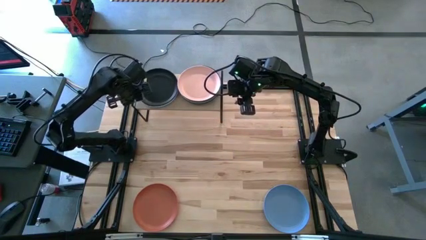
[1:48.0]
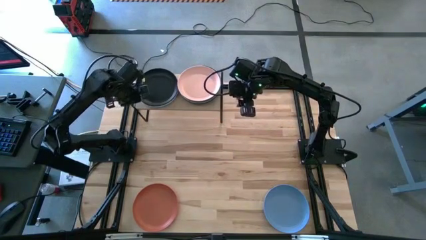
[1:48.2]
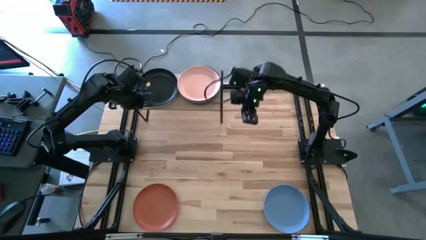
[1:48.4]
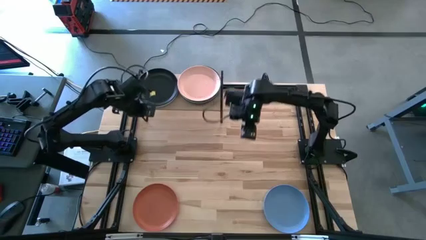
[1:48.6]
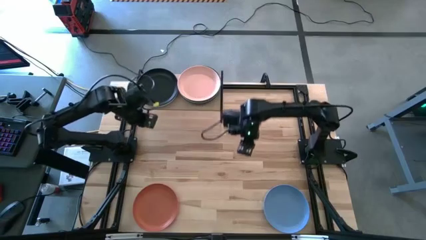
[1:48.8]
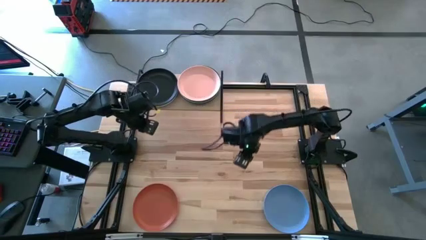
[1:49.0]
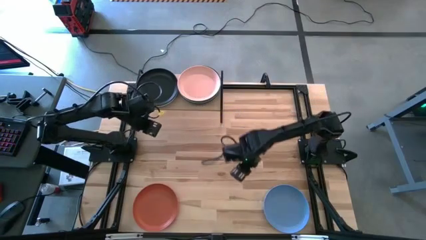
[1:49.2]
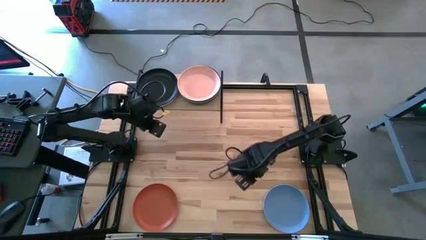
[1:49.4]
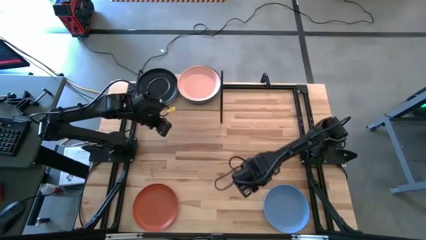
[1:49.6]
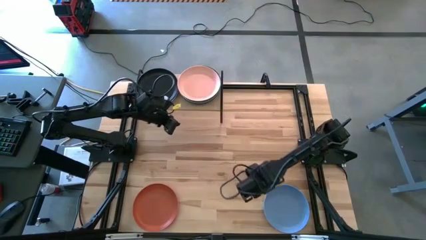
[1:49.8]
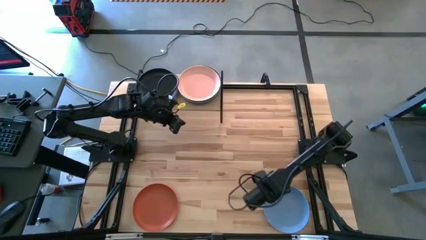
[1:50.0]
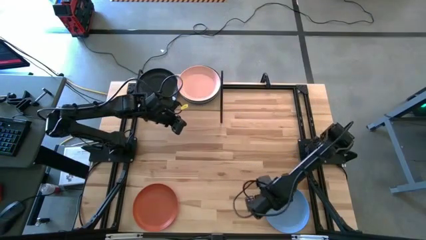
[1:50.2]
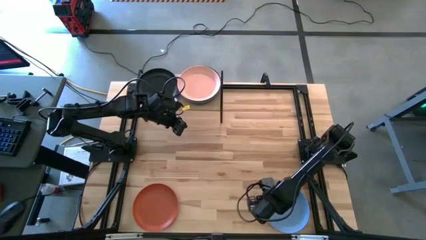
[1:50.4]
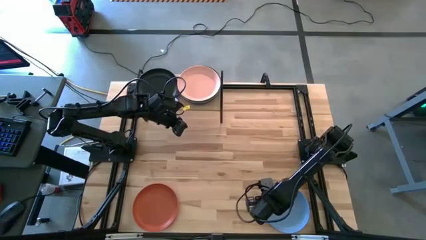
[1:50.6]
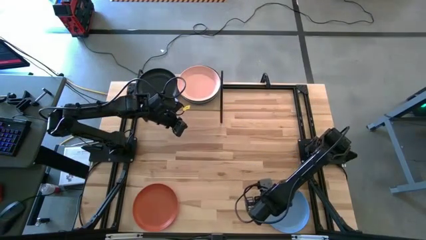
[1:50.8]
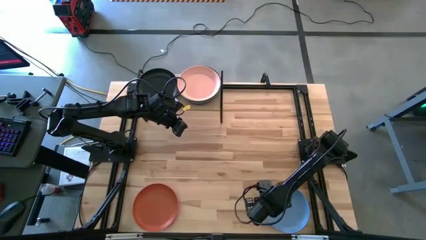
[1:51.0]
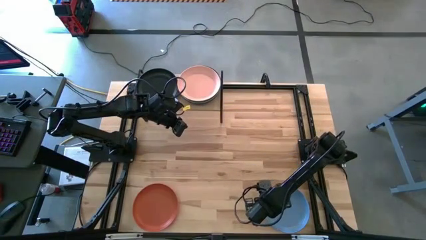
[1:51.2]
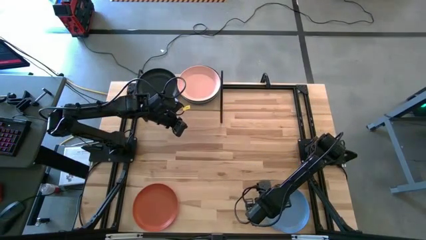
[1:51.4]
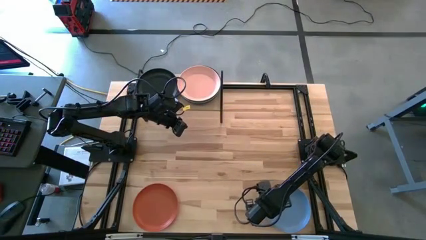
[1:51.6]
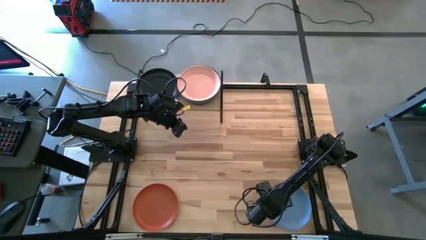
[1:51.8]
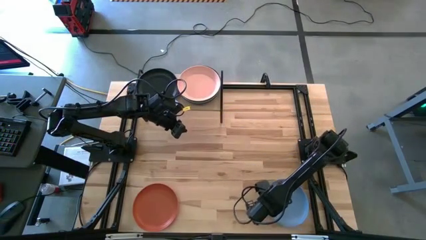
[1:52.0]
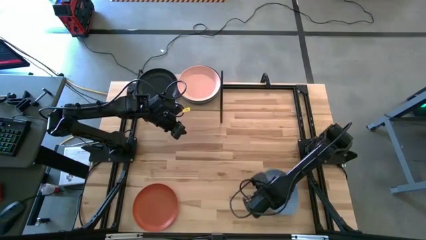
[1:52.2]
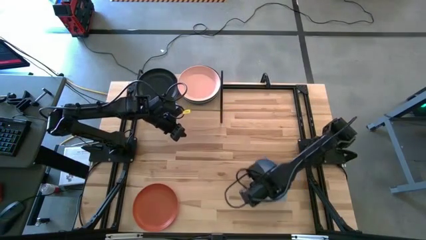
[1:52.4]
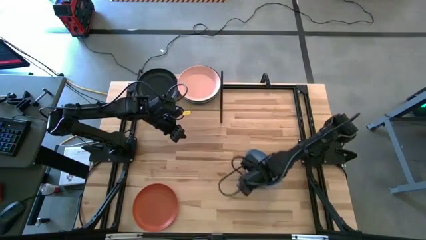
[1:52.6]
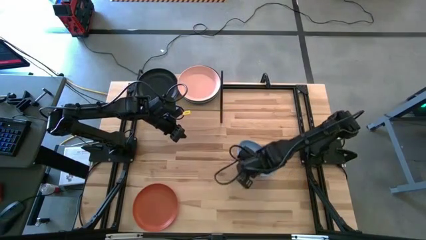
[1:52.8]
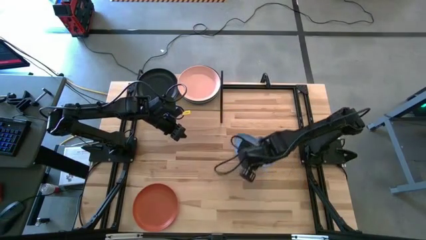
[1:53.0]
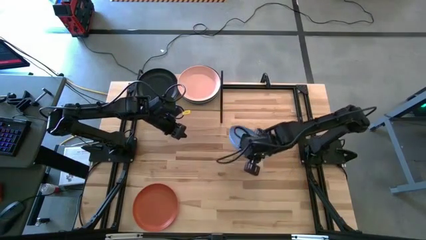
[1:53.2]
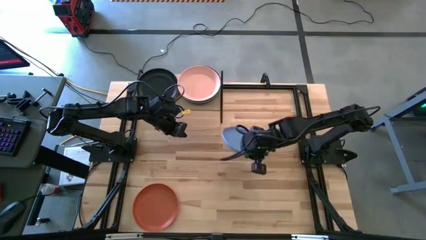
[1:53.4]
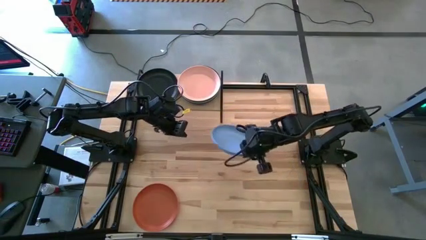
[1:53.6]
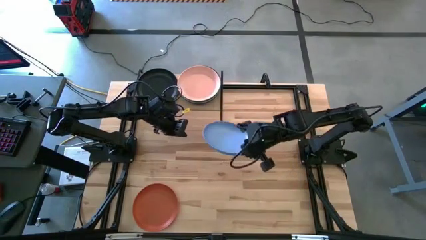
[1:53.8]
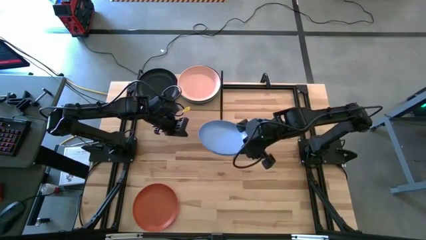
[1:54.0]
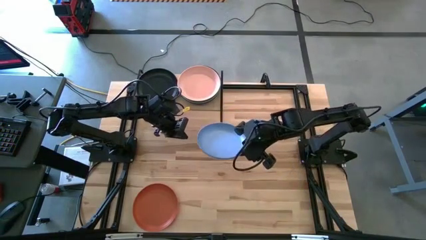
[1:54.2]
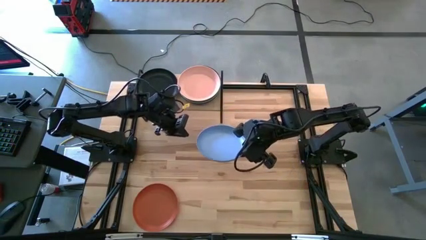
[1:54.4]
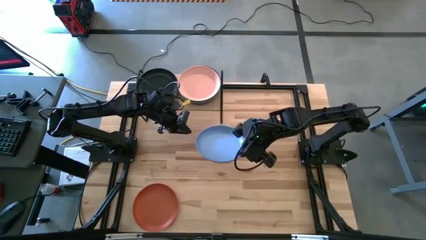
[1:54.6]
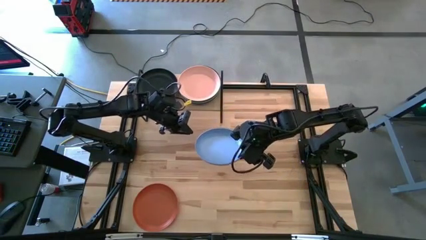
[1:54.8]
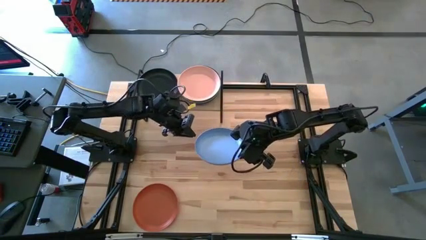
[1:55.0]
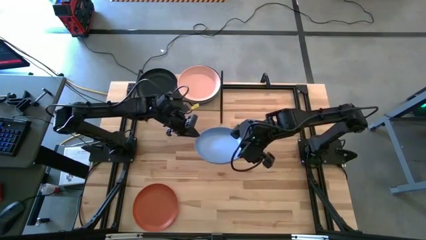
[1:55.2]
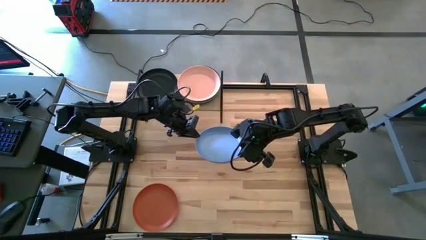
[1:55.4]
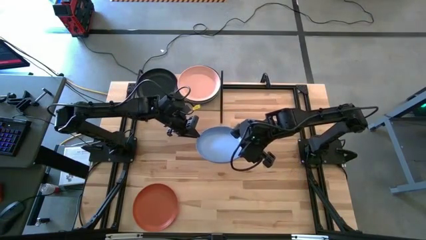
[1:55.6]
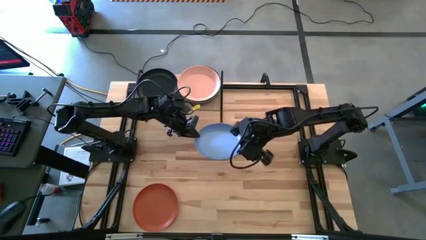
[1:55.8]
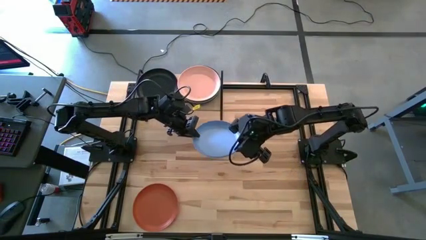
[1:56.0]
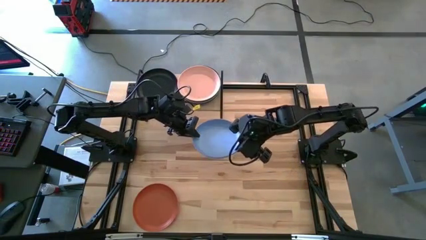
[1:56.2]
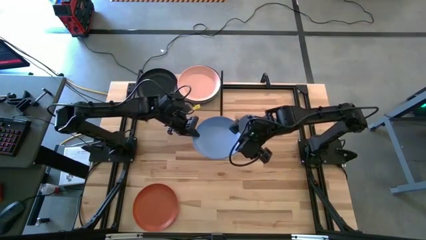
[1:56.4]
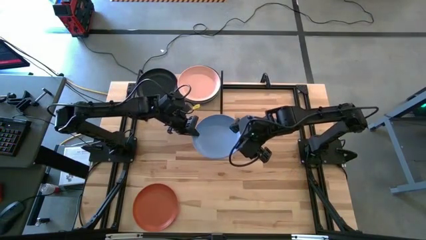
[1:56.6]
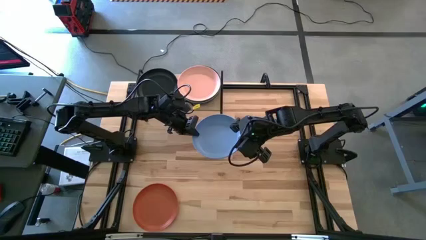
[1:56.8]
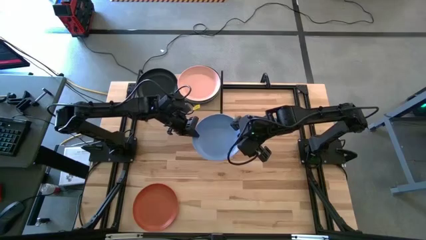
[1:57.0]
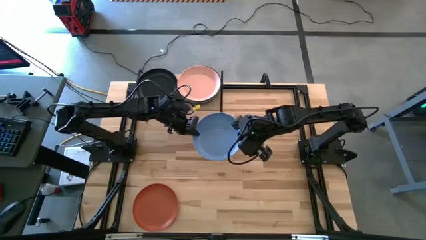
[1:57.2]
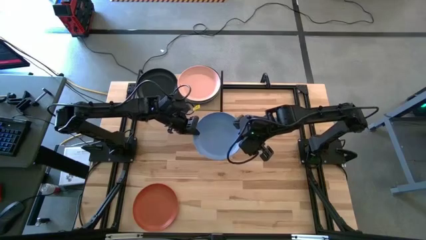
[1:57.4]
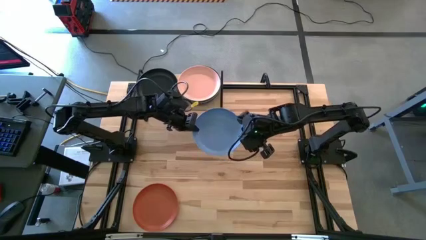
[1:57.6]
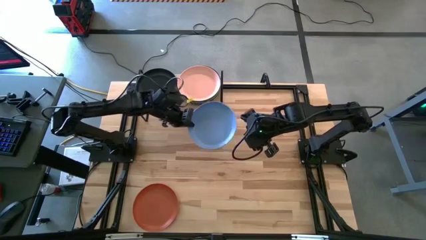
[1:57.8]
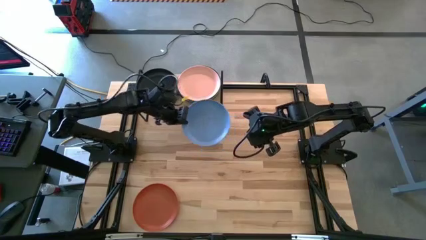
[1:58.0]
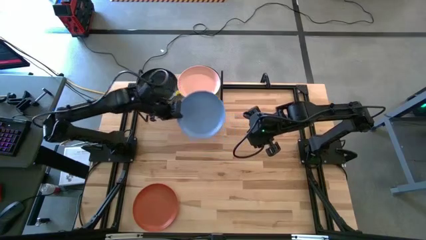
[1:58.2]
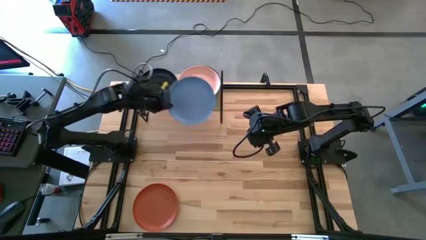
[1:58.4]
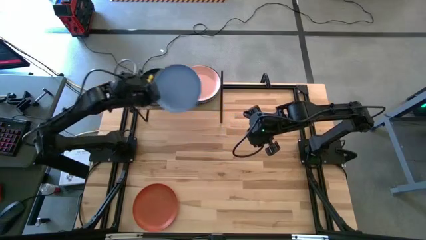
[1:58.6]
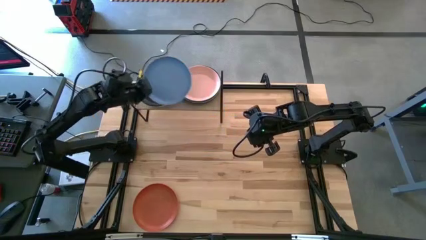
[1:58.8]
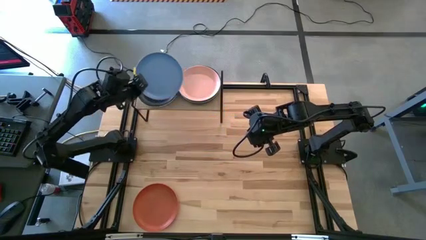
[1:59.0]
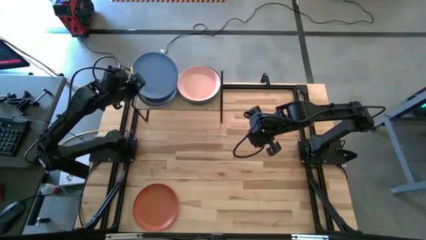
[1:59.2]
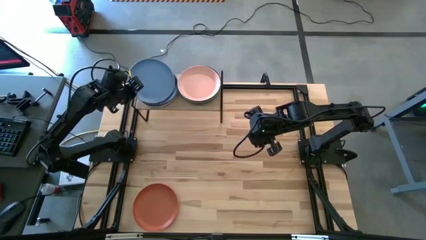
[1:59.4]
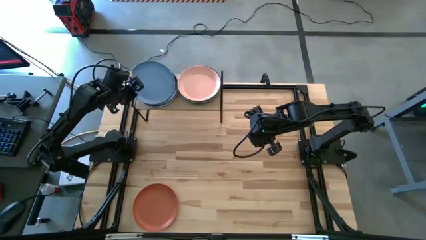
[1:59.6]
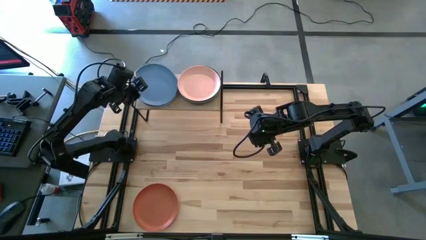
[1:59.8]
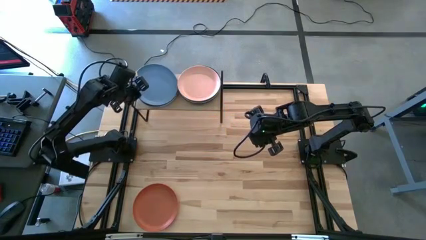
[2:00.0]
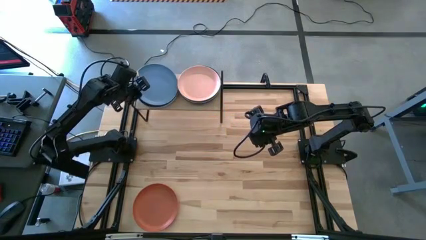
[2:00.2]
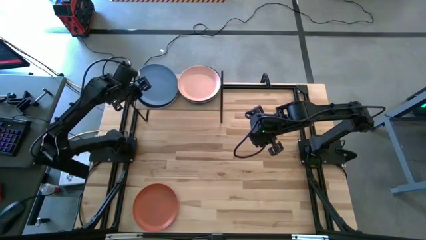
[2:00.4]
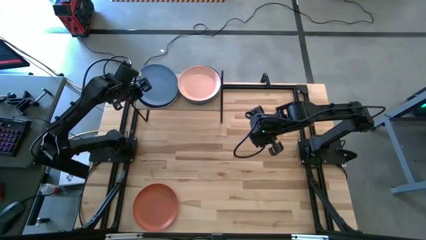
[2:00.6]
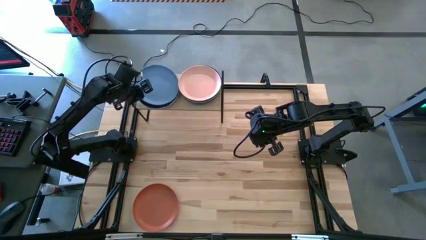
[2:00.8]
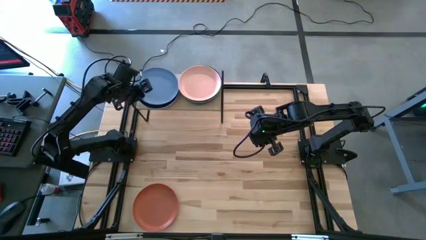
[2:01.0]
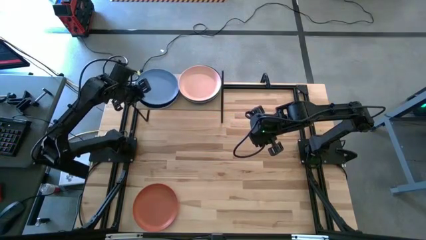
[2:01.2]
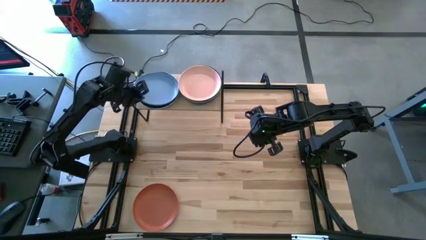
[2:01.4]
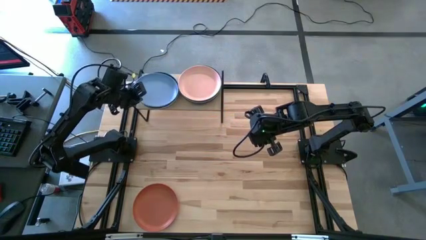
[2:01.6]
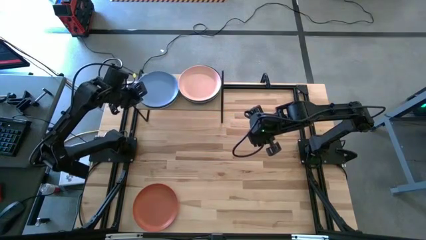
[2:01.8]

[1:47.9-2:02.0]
Task: Place and stack plates onto a shelf
Stack the blue plate on top of the dark blue plate on the shelf
